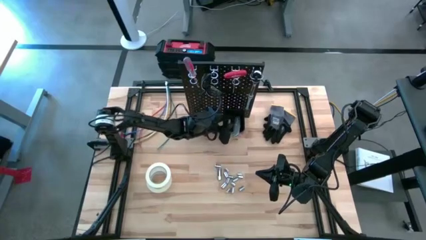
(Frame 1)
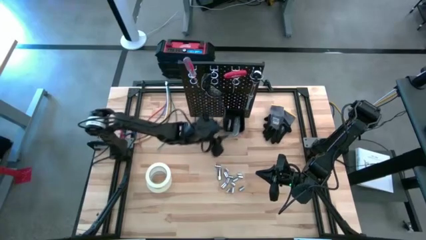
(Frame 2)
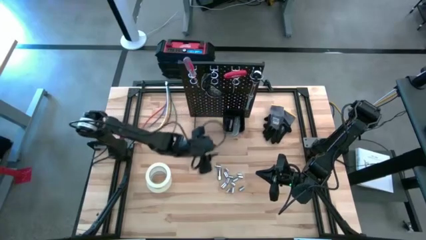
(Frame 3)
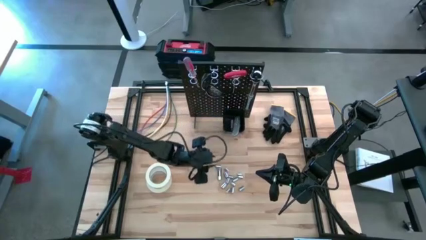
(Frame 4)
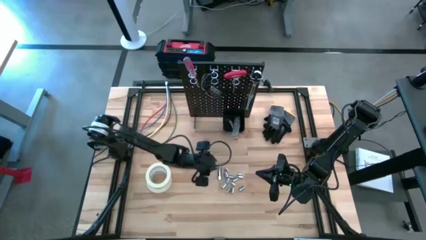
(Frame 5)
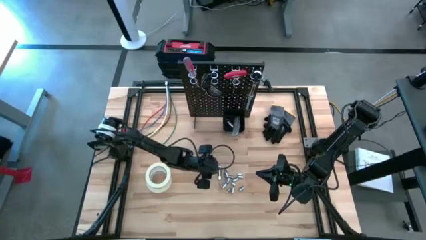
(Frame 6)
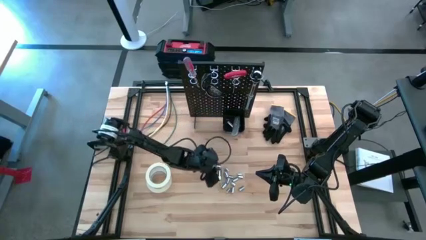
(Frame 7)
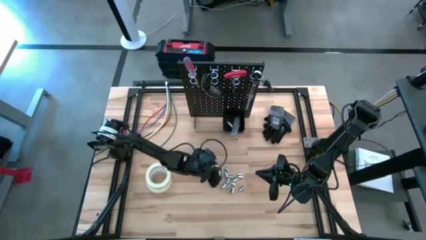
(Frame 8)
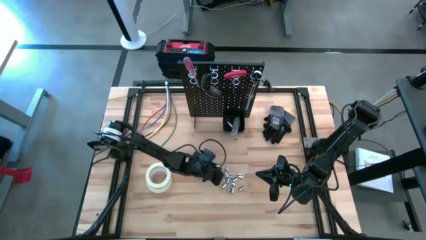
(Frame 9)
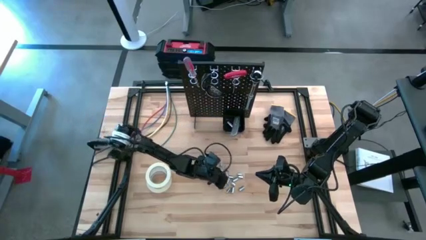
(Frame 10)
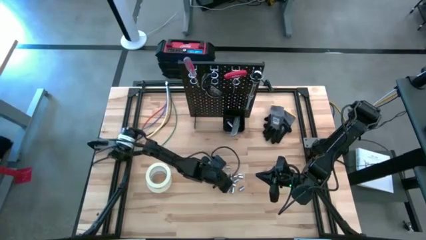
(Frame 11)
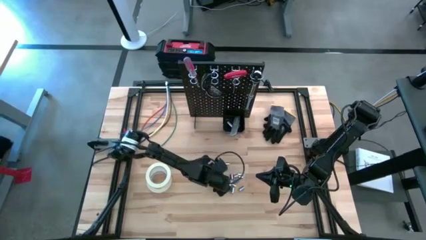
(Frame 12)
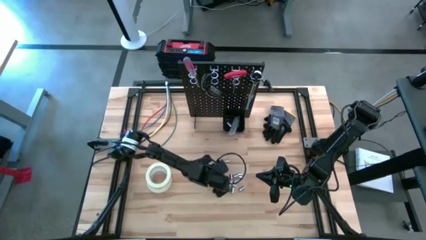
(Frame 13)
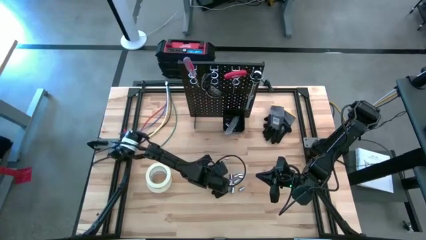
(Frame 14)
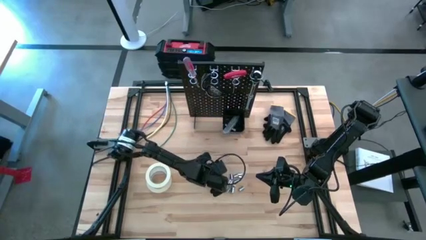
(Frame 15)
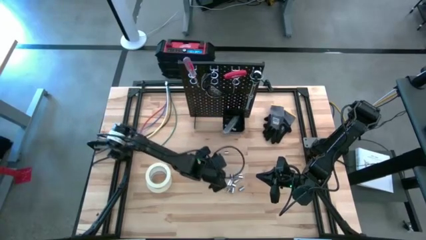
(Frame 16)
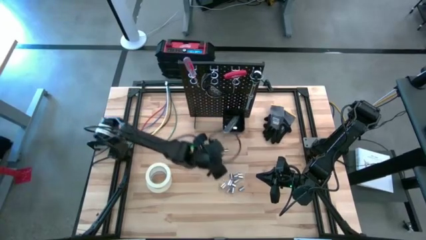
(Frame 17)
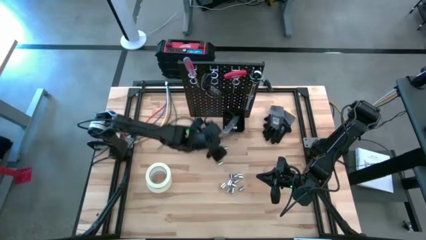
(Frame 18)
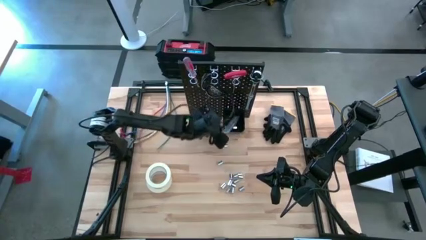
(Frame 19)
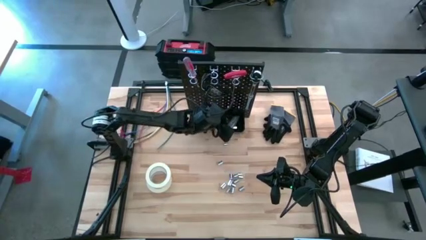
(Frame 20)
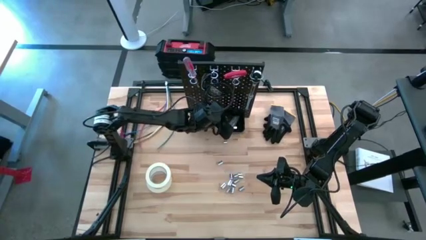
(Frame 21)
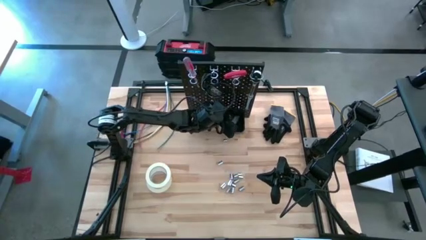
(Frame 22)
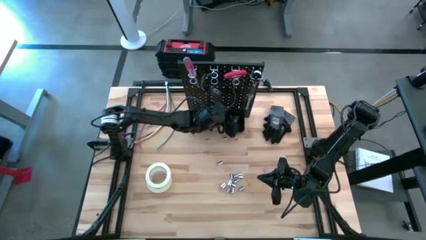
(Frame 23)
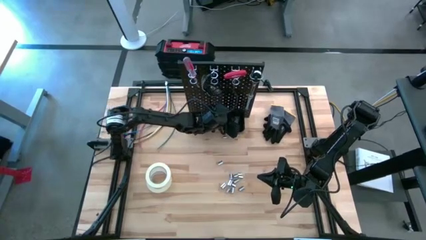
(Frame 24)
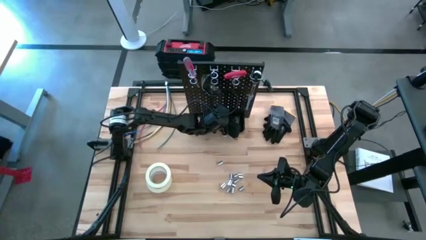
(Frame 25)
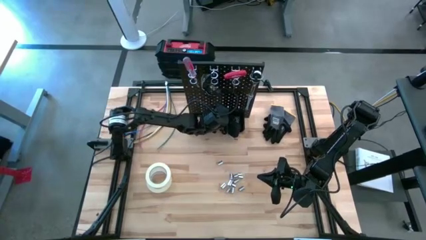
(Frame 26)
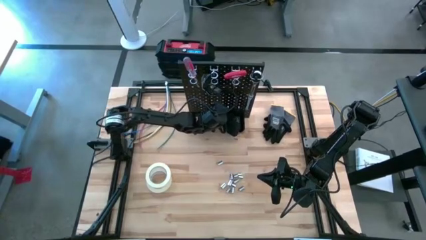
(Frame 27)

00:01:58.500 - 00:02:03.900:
Task: Hang tools onto peg board
Put the extension bar into the black bin on the peg board

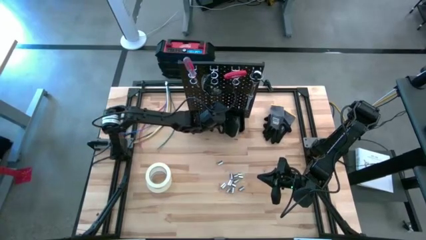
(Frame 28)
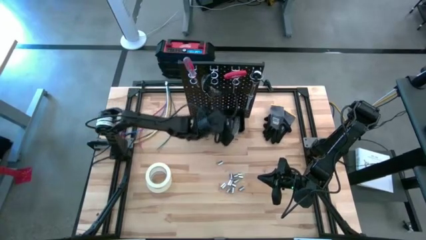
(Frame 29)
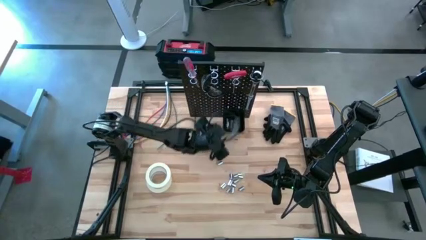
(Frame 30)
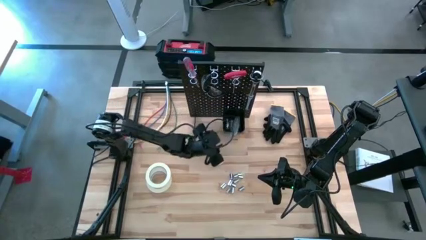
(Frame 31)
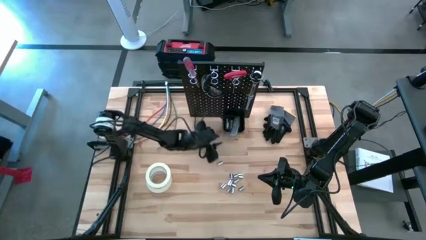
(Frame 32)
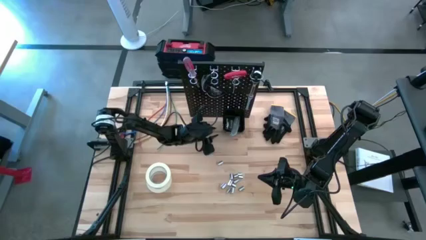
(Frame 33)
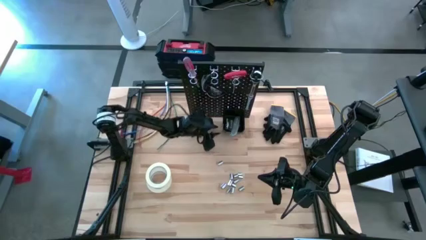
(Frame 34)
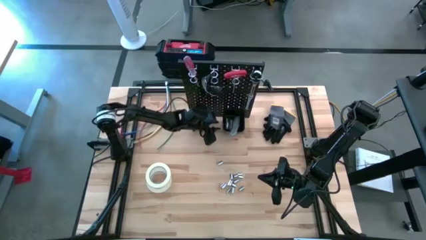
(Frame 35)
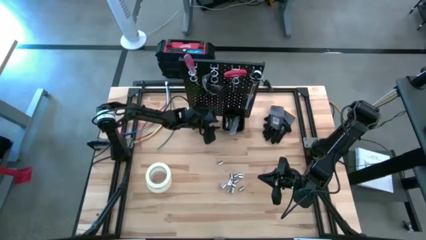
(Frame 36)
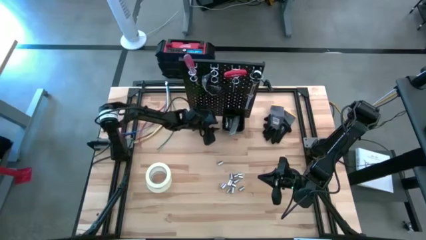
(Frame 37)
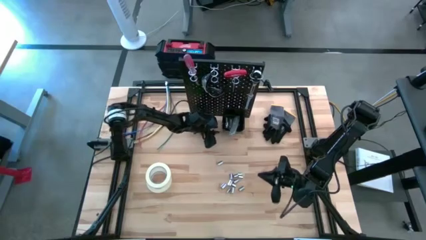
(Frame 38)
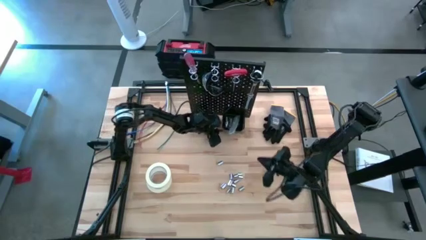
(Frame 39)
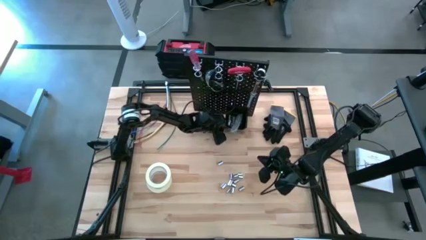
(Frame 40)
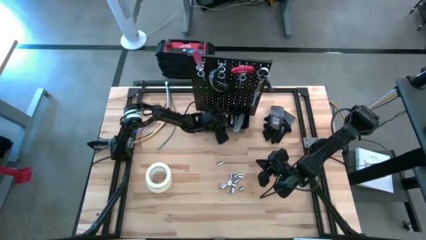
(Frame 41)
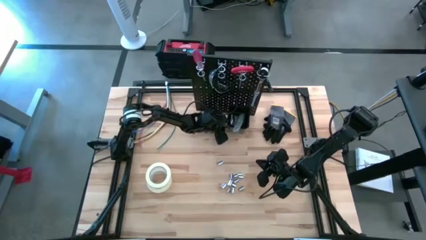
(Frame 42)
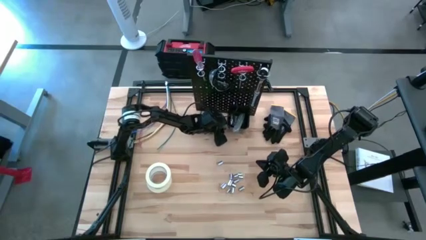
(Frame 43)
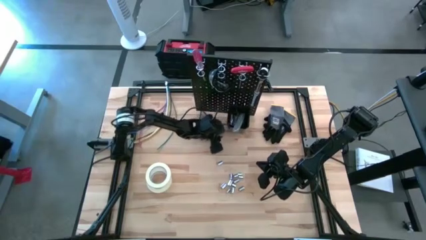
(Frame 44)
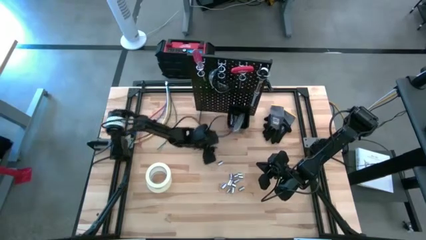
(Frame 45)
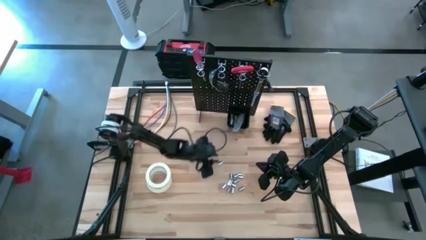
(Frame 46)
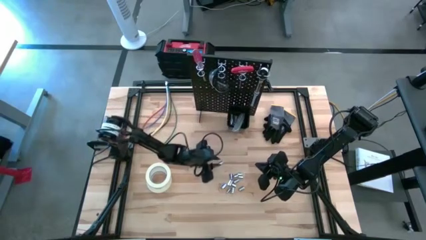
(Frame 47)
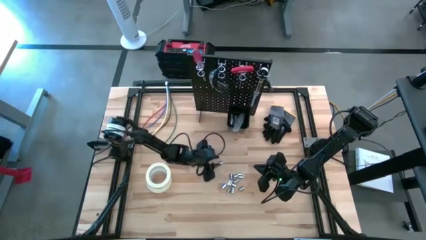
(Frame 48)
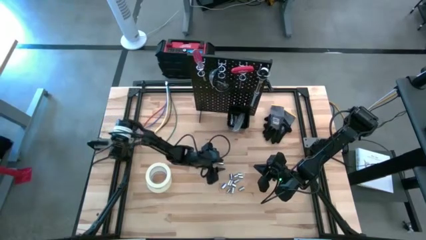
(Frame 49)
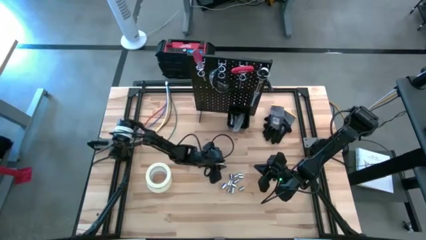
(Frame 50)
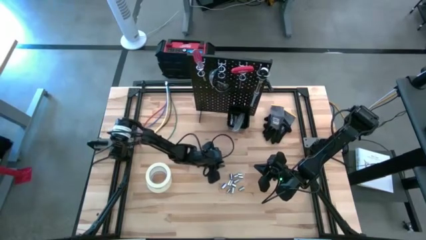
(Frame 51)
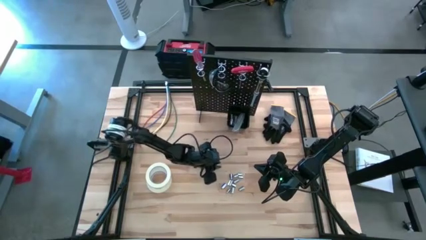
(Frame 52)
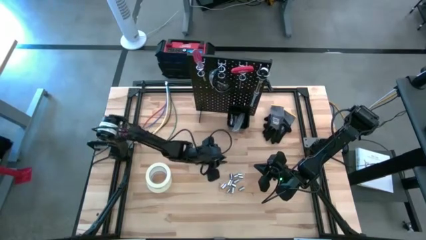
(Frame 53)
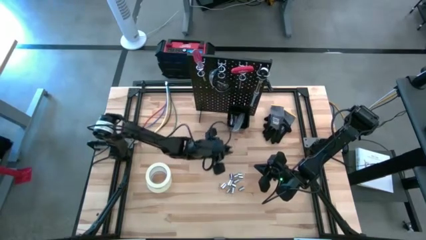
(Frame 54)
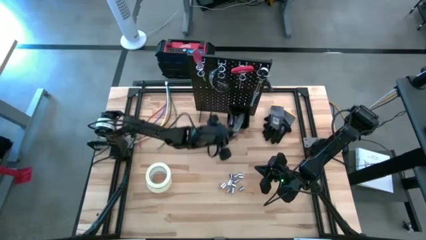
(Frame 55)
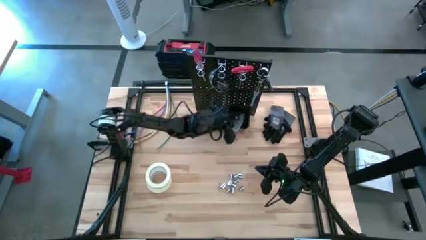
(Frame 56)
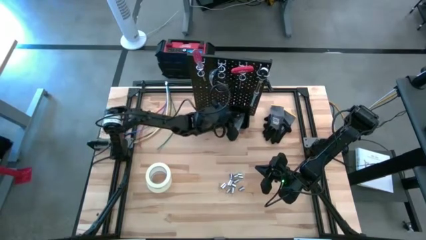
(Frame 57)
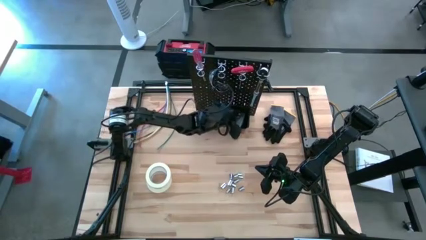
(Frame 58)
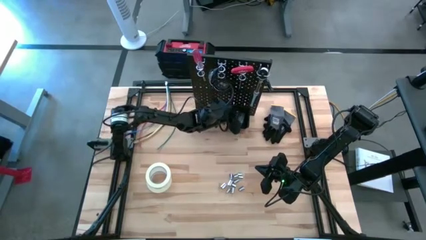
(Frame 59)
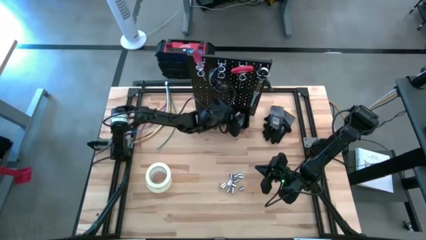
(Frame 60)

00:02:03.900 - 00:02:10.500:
Put the socket into the black bin on the peg board

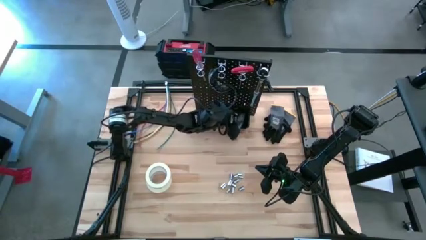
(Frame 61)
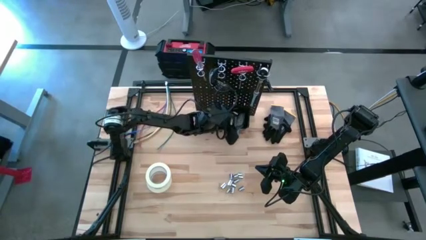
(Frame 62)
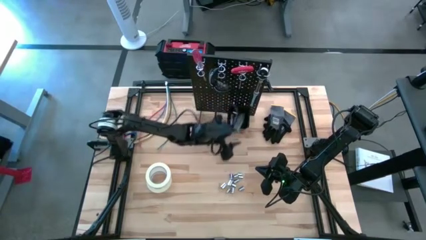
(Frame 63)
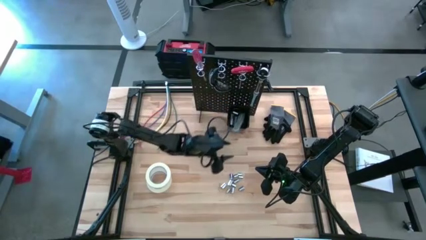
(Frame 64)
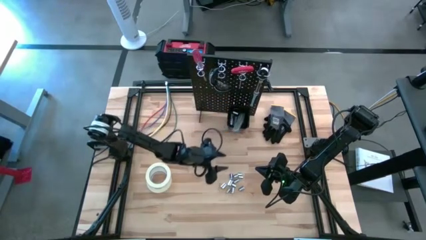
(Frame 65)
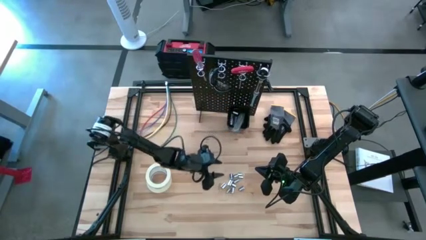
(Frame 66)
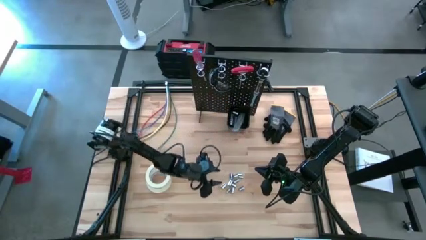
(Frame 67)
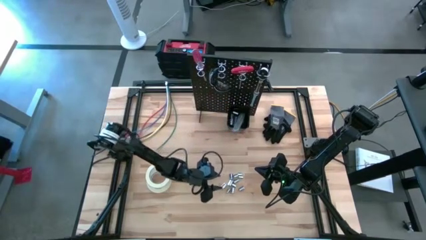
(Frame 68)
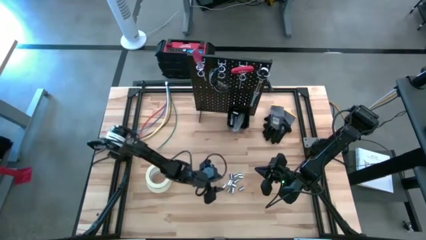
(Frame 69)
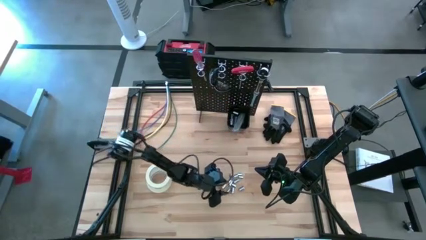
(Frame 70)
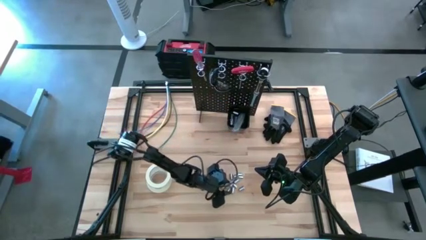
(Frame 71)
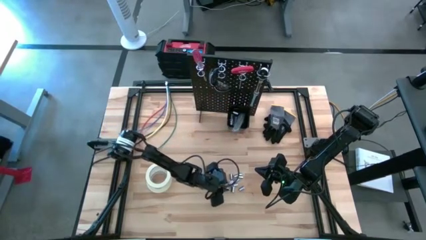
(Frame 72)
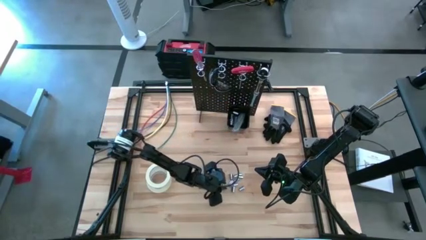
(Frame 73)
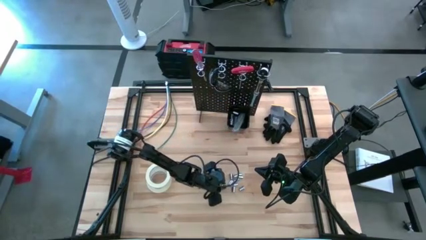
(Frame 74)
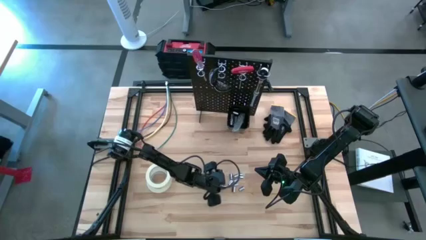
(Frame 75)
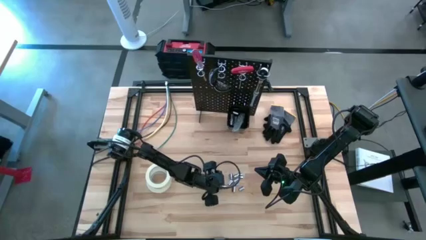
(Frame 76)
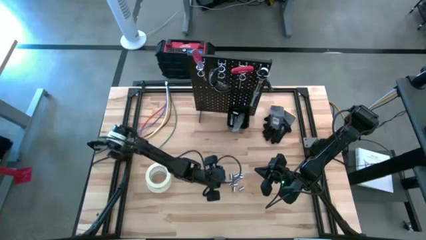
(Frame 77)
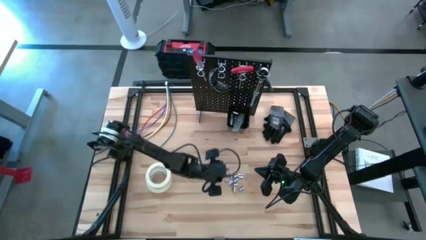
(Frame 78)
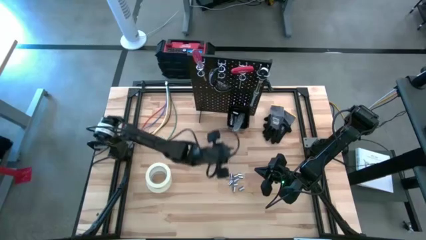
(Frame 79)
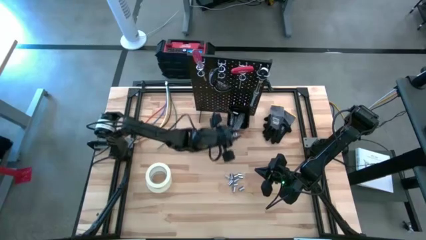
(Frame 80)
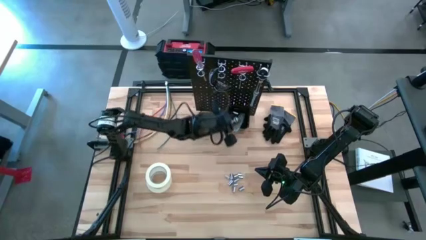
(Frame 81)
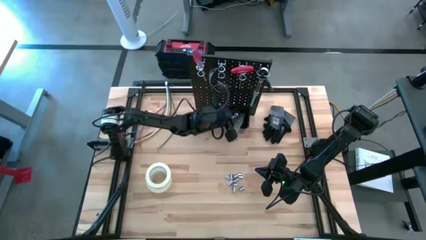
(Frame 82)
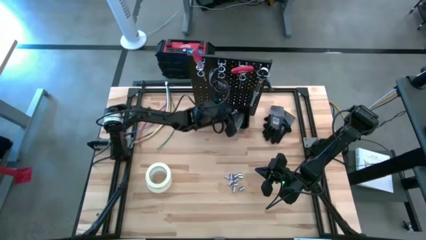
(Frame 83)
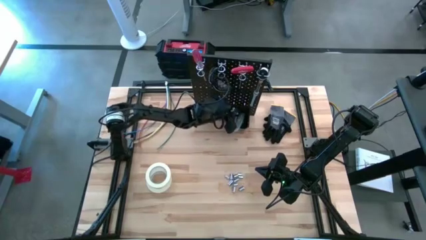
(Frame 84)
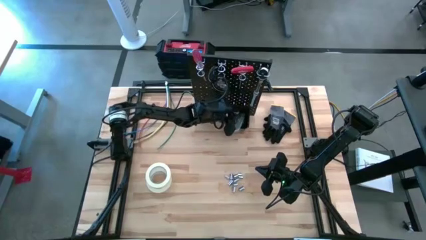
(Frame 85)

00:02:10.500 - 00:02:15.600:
Put the socket into the black bin on the peg board

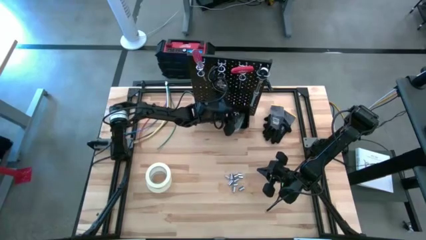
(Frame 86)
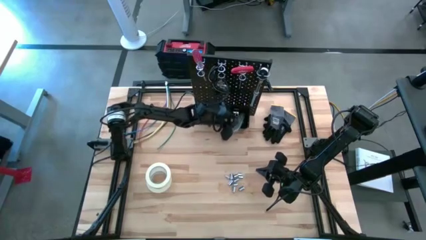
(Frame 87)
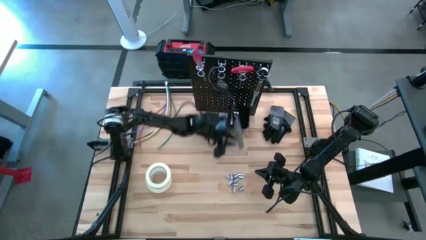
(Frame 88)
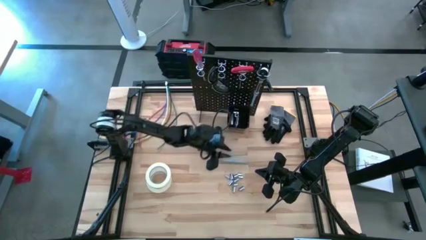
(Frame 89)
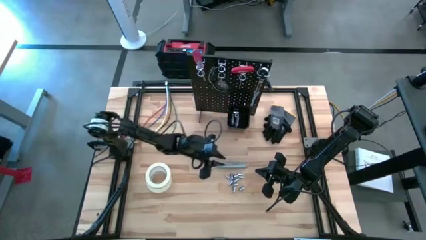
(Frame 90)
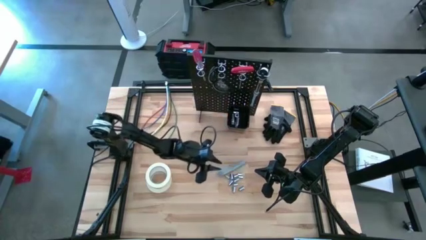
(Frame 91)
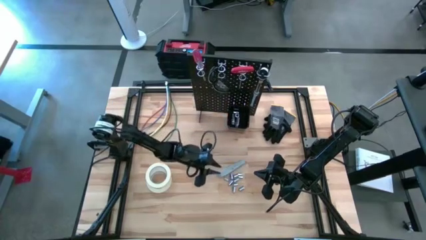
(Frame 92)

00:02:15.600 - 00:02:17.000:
Put the cutter into the black bin on the peg board
